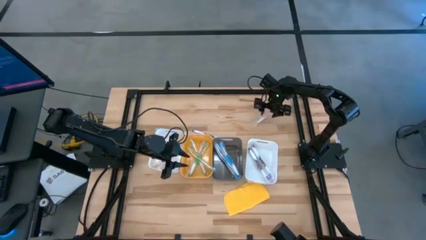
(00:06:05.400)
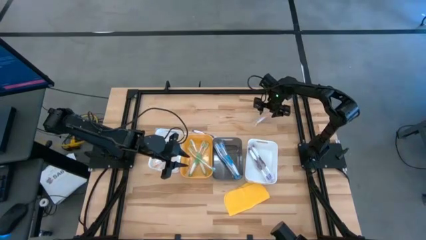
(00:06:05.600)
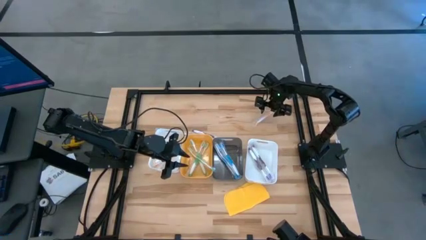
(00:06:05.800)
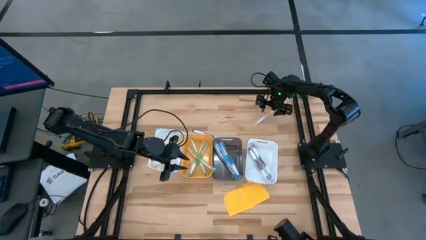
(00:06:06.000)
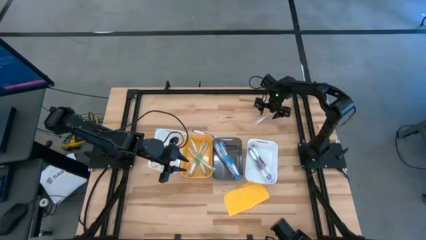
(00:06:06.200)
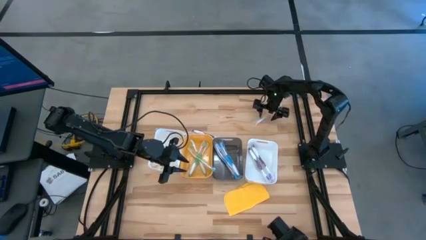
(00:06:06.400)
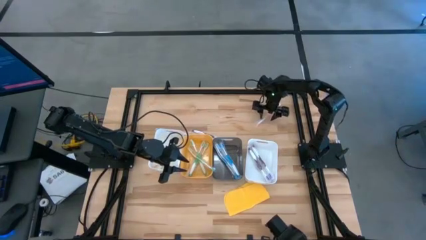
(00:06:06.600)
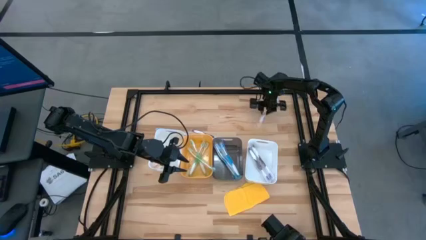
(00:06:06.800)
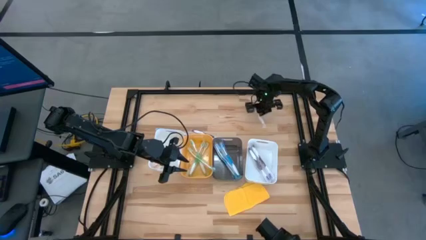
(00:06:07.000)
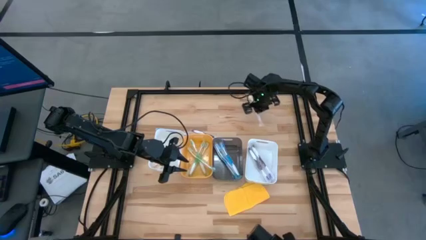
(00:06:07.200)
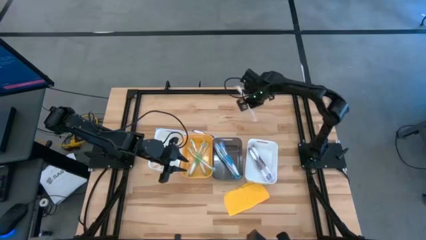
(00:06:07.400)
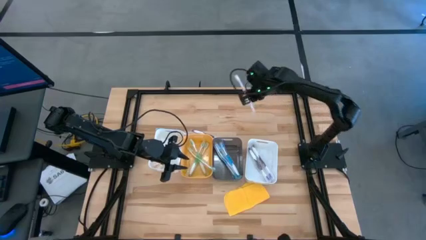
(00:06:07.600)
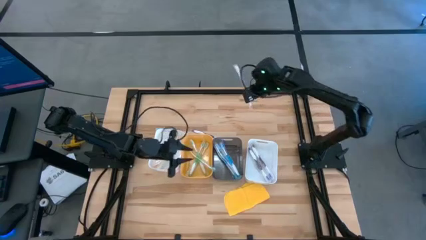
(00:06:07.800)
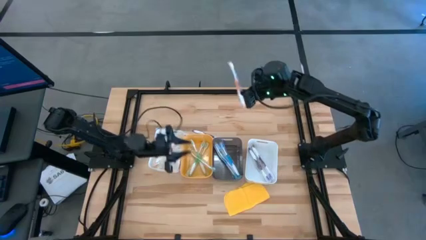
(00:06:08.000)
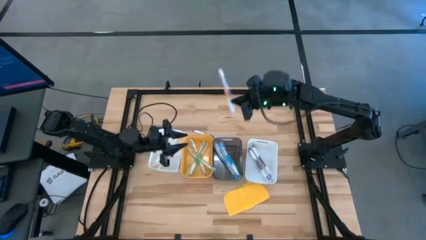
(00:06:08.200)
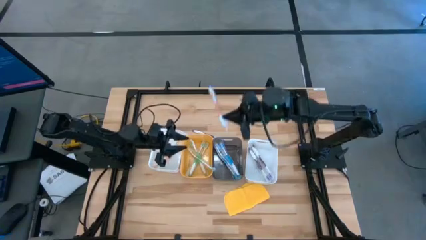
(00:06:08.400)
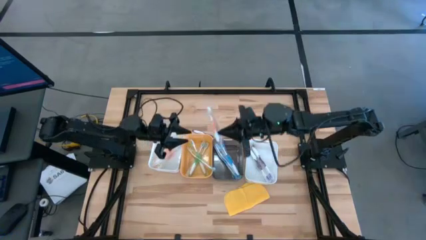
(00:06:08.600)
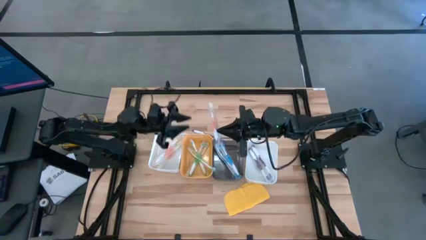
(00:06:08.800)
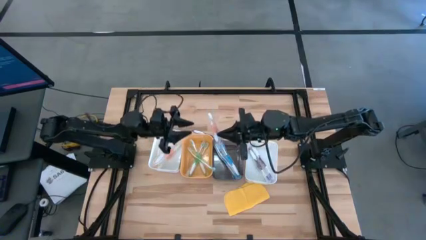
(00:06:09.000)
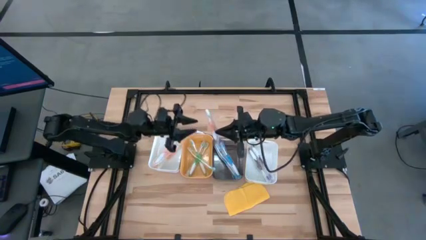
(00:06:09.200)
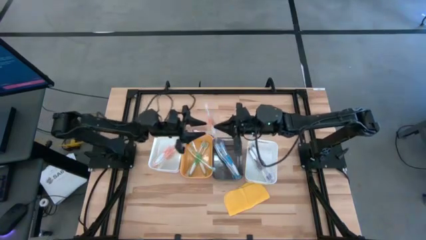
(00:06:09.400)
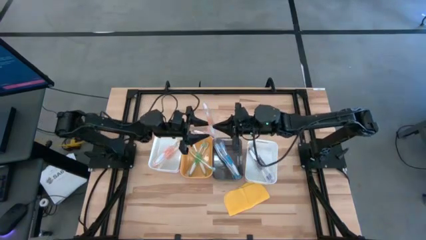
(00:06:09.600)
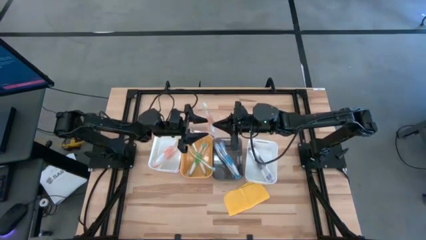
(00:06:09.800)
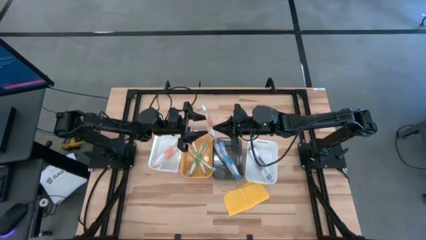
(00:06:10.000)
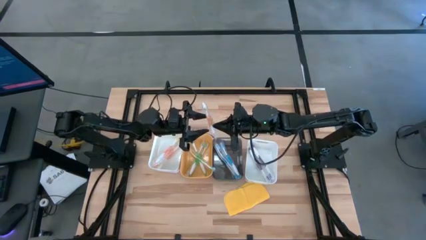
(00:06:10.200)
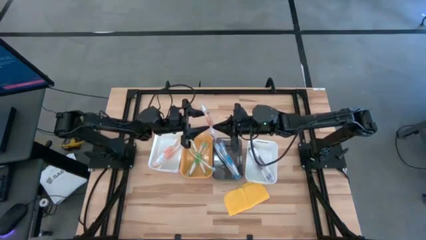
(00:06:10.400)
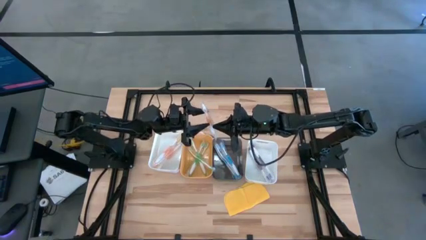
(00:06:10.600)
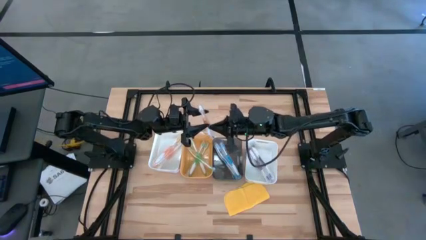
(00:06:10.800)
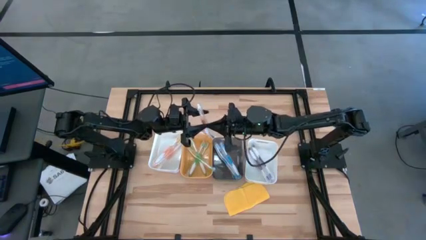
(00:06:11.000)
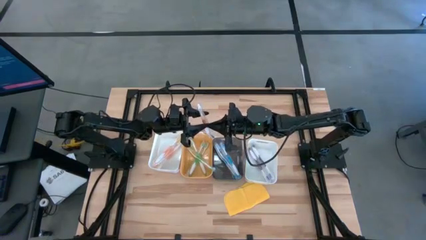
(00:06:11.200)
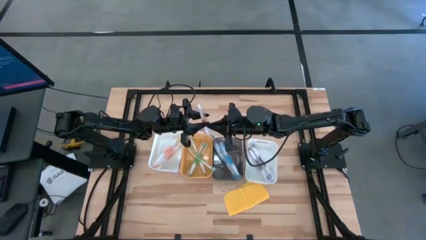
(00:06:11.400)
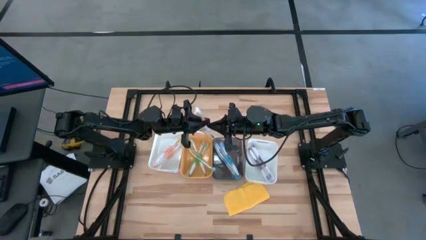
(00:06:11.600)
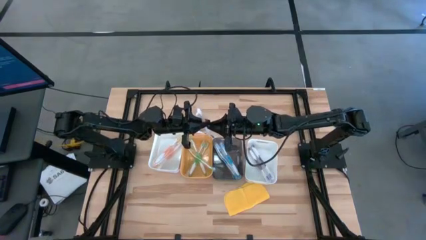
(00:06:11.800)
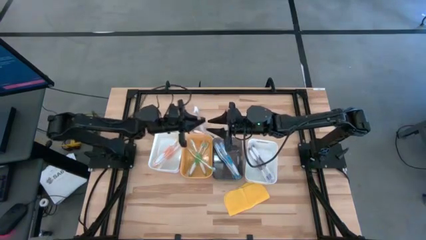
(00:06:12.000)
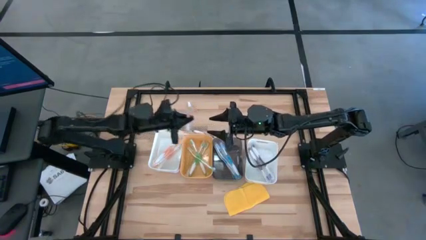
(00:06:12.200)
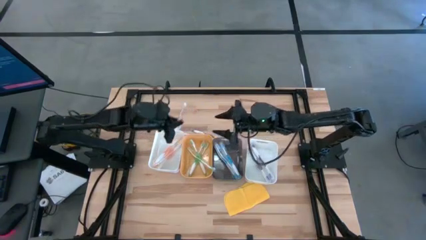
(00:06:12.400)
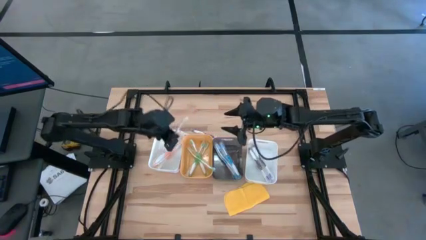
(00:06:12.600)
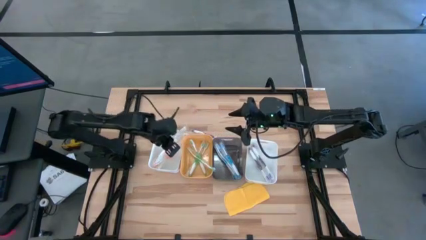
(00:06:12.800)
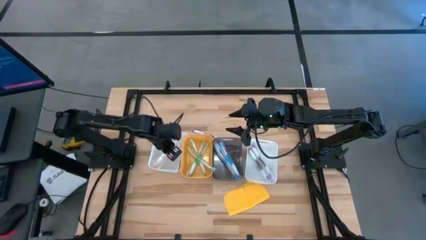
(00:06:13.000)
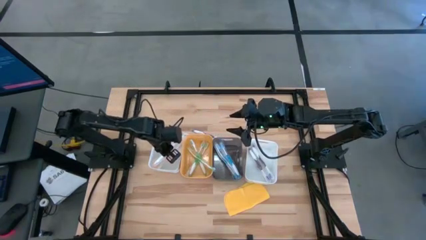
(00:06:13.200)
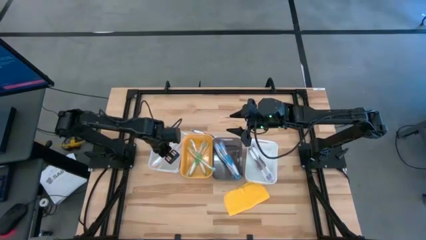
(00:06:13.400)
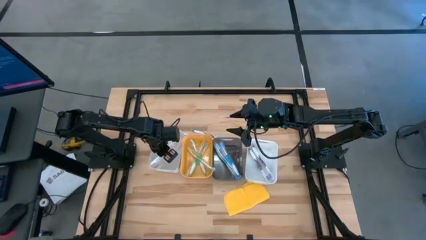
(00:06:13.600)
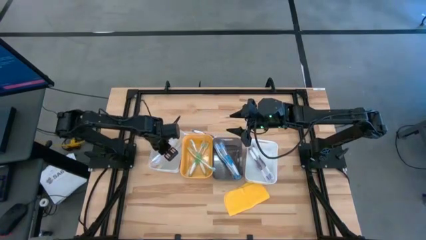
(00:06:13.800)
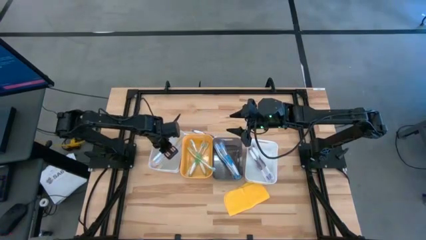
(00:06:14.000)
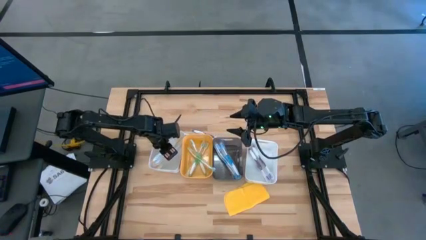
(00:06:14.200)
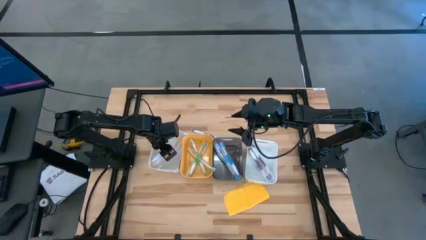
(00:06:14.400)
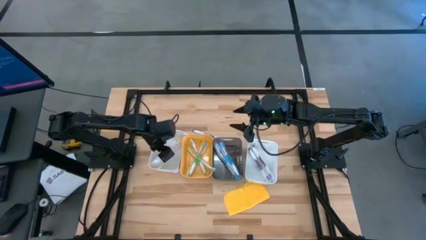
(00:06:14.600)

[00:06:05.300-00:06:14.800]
Task: Pick & Place Toothbrushes
Put the orange toothbrush into the left white bin

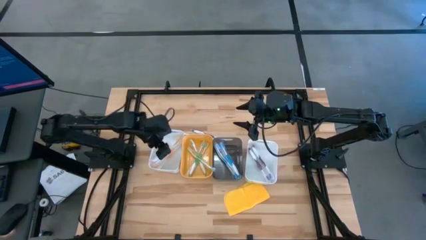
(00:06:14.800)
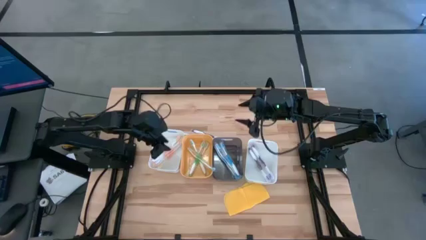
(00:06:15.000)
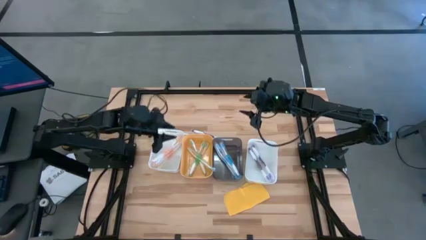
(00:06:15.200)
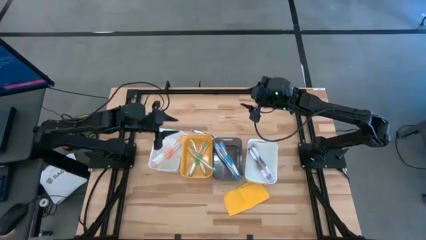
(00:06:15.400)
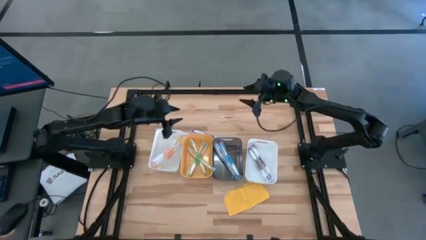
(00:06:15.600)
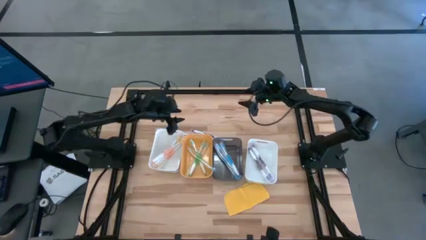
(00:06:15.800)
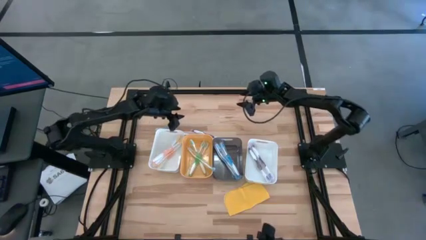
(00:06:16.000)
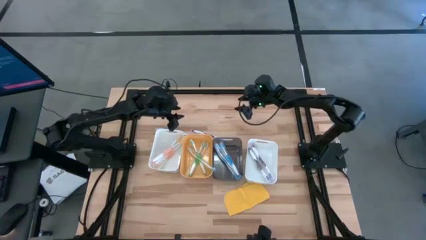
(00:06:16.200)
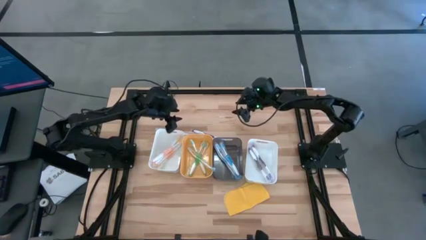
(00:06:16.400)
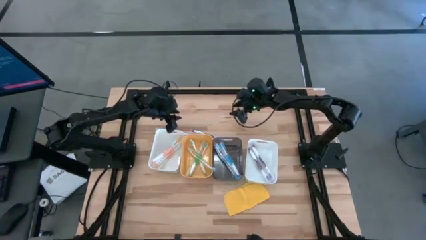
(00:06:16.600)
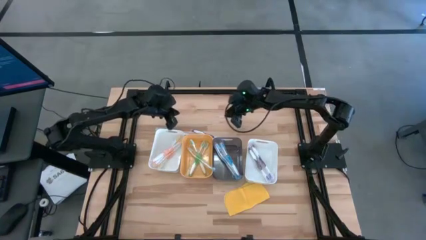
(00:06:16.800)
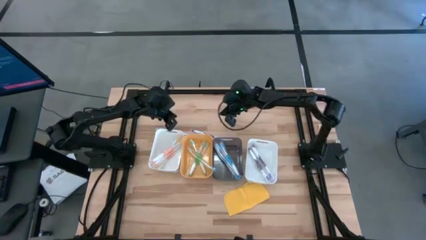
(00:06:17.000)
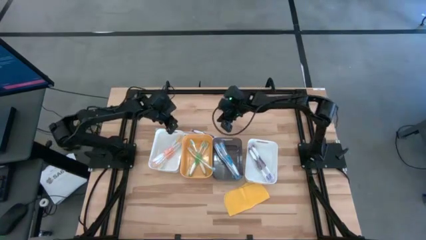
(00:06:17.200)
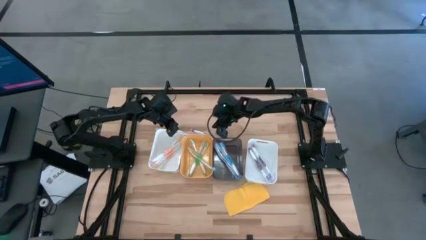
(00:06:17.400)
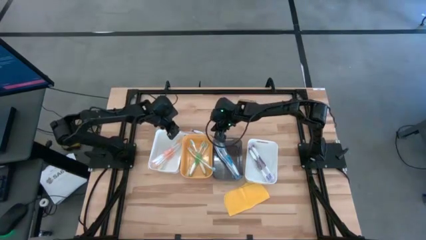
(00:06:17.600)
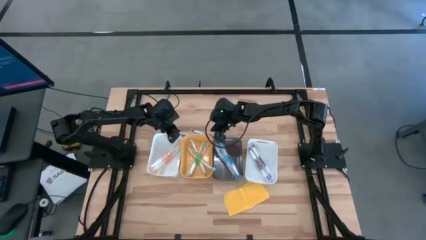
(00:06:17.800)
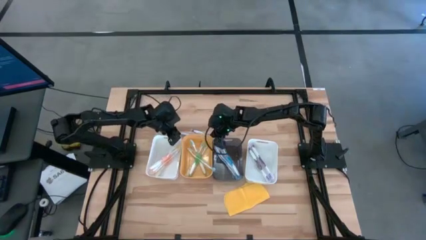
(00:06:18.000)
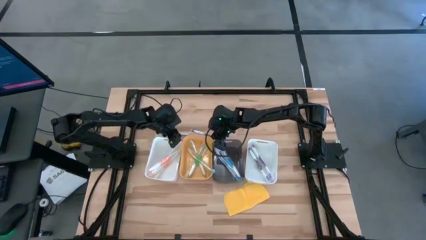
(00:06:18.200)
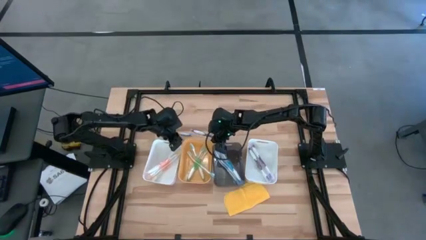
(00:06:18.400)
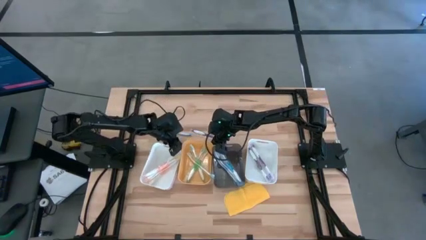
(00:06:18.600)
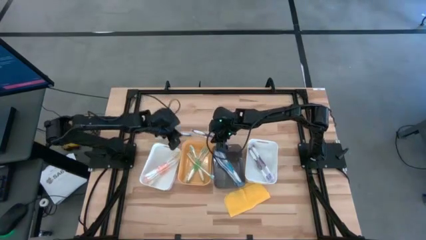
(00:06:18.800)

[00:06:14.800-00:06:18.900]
Adjust the bins
